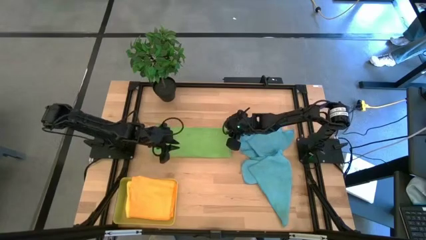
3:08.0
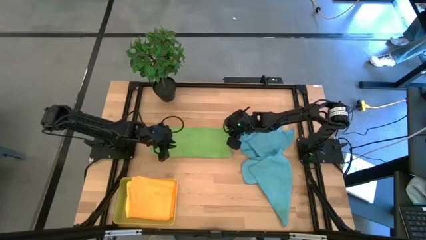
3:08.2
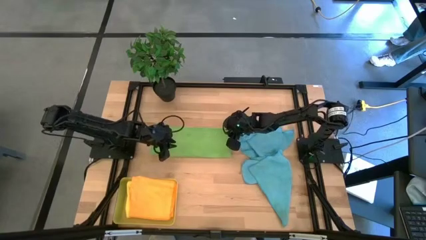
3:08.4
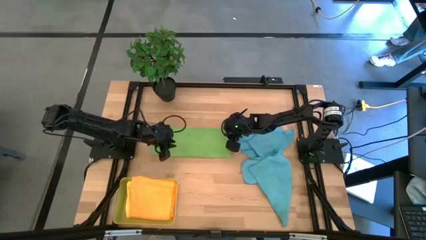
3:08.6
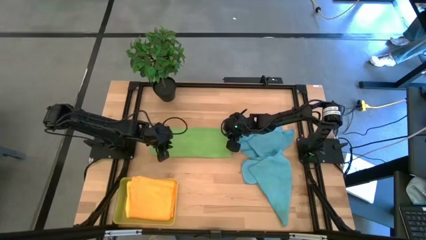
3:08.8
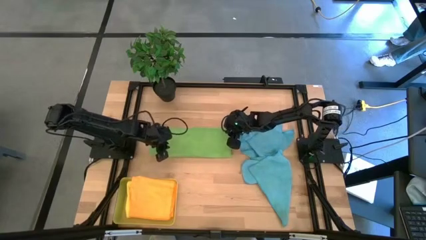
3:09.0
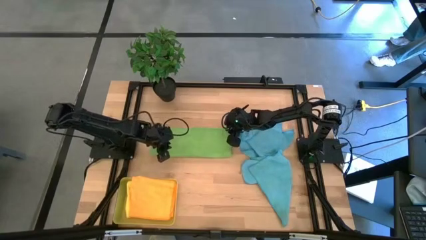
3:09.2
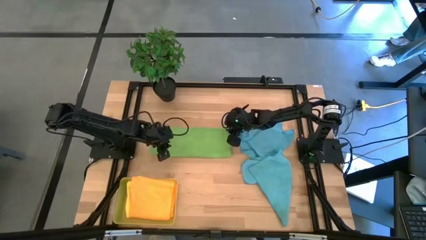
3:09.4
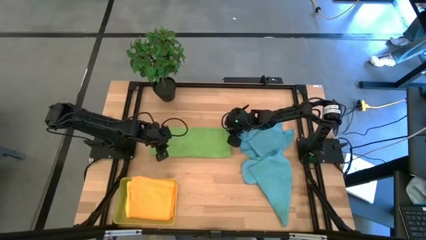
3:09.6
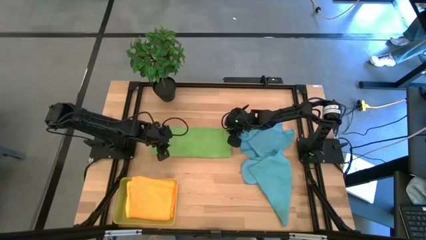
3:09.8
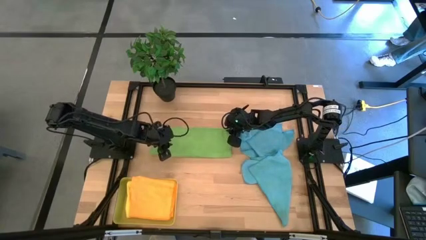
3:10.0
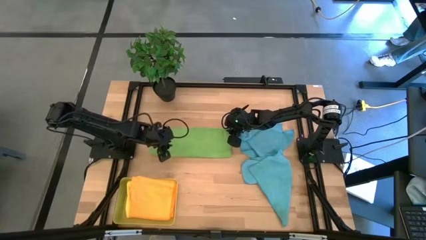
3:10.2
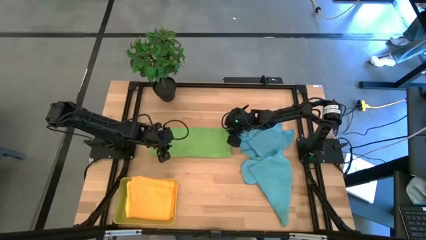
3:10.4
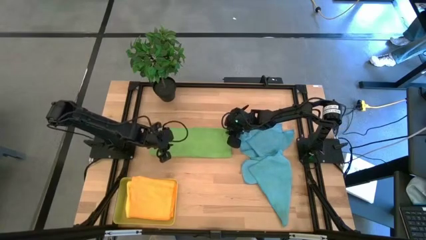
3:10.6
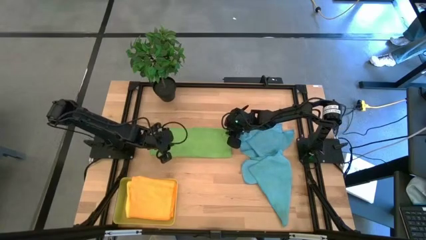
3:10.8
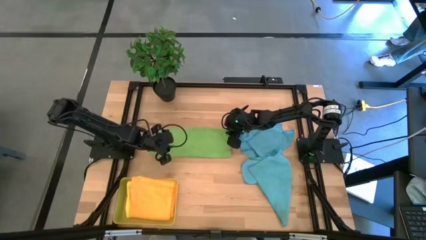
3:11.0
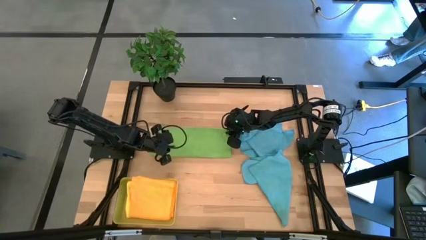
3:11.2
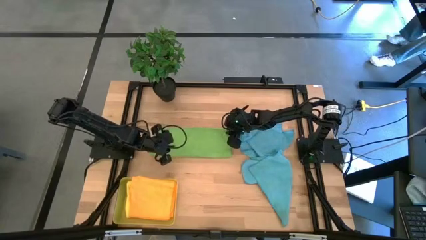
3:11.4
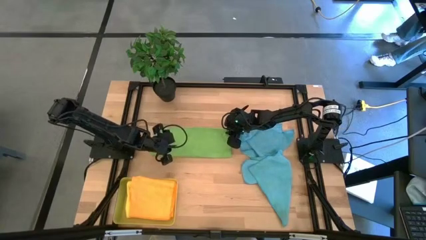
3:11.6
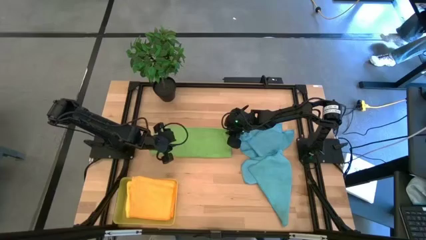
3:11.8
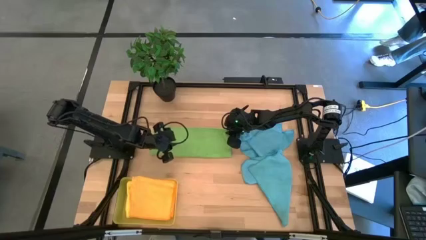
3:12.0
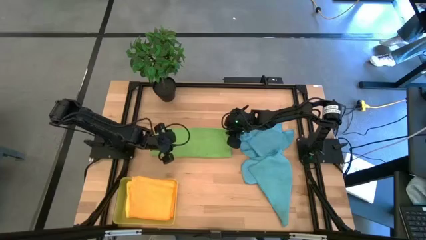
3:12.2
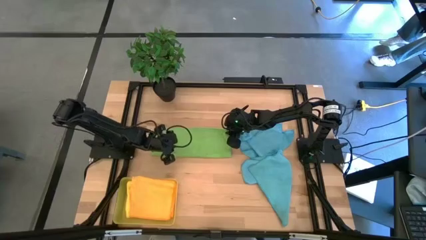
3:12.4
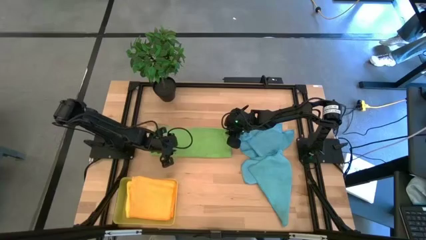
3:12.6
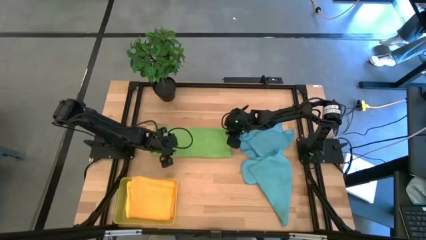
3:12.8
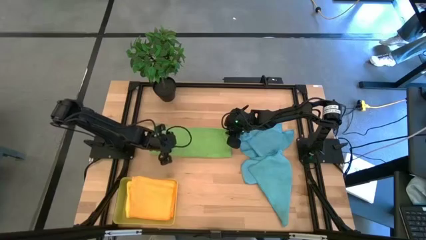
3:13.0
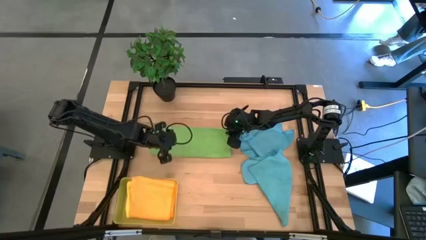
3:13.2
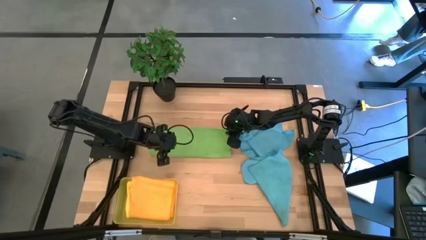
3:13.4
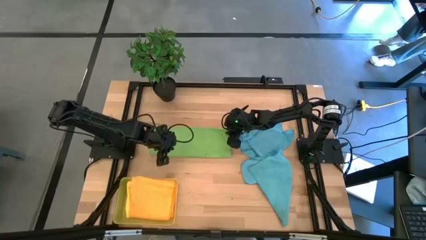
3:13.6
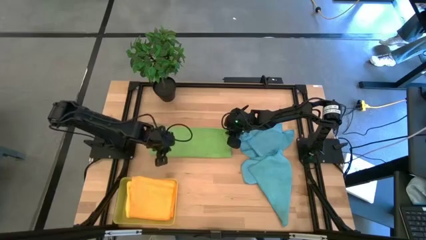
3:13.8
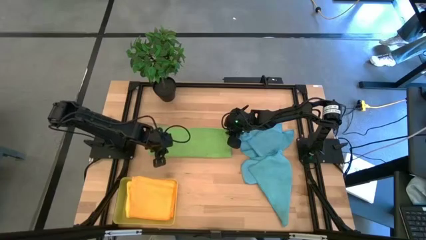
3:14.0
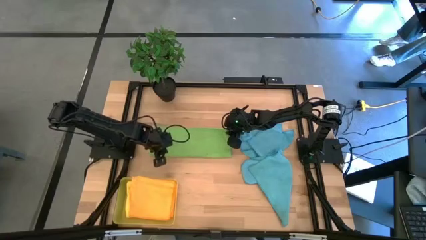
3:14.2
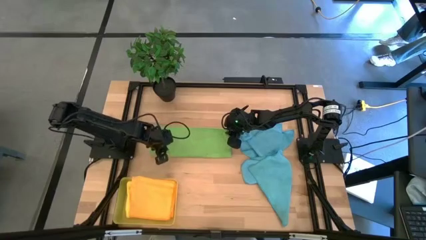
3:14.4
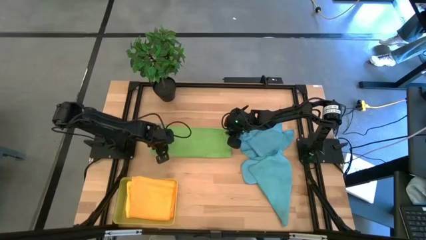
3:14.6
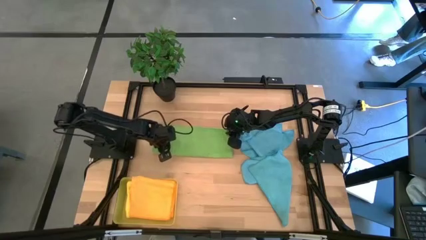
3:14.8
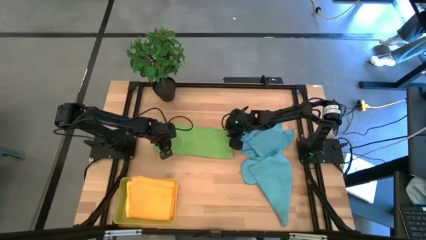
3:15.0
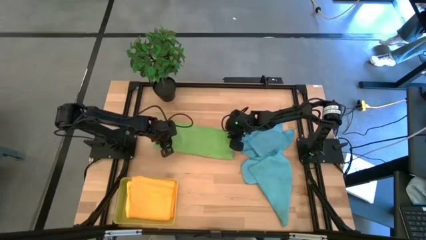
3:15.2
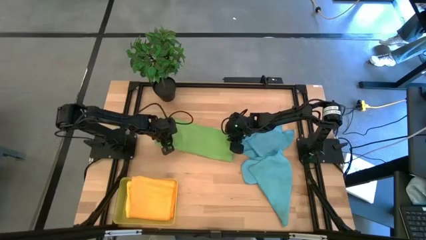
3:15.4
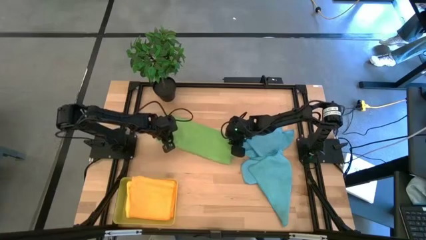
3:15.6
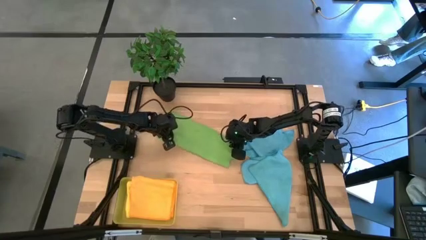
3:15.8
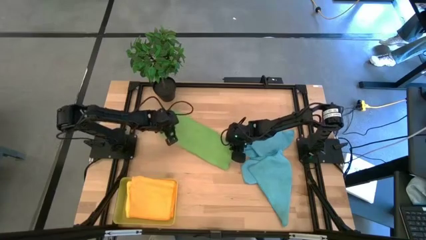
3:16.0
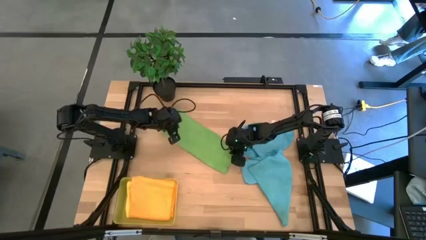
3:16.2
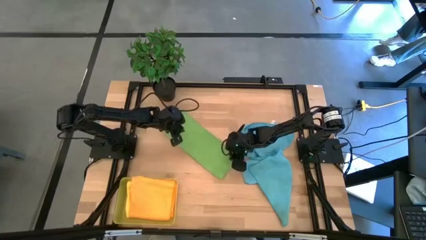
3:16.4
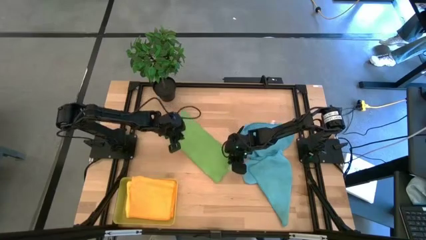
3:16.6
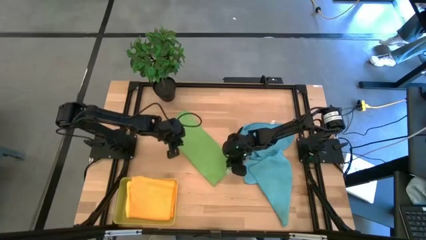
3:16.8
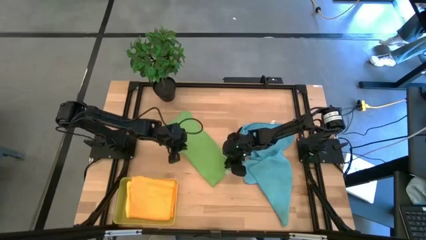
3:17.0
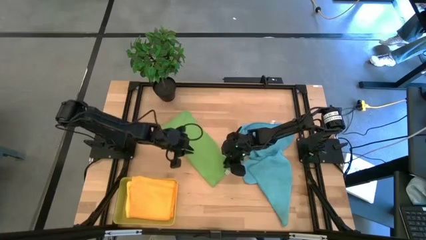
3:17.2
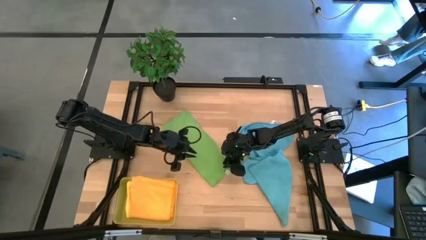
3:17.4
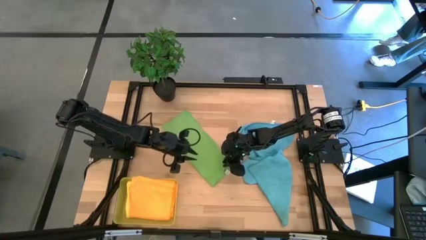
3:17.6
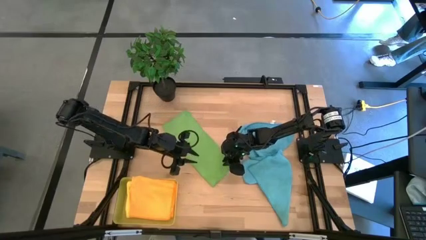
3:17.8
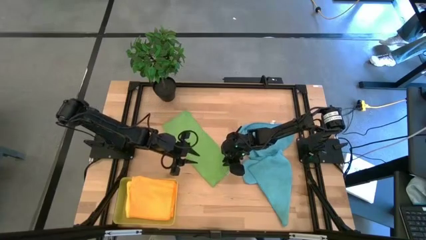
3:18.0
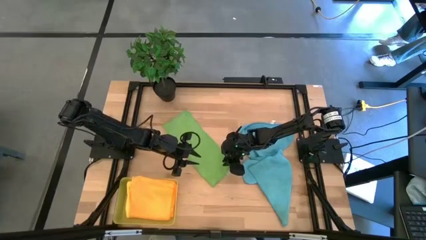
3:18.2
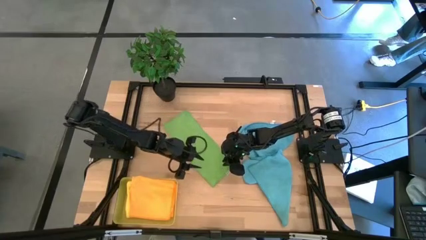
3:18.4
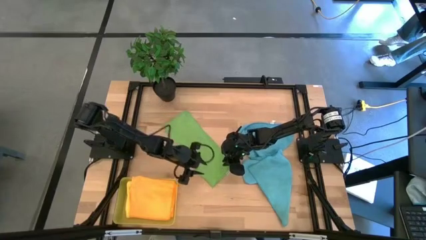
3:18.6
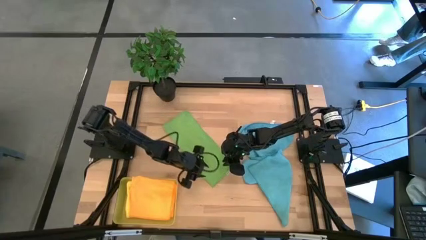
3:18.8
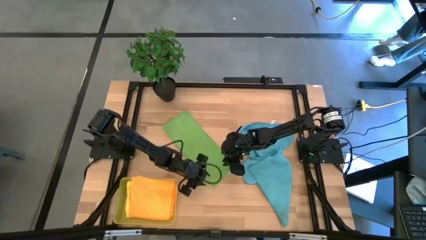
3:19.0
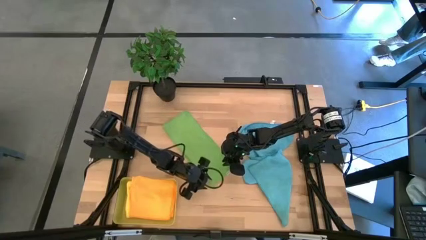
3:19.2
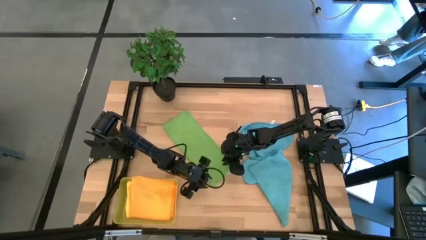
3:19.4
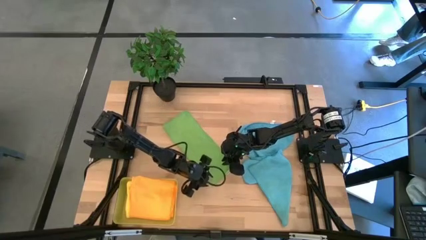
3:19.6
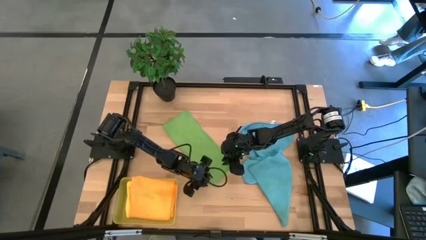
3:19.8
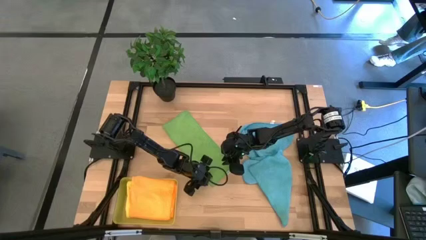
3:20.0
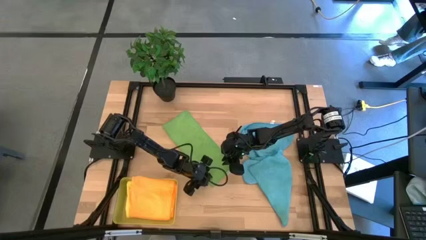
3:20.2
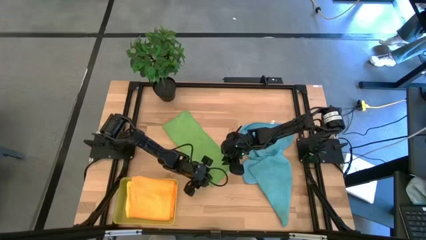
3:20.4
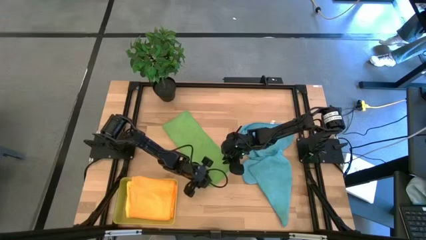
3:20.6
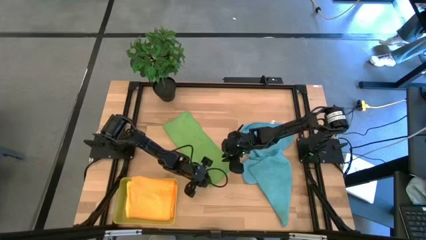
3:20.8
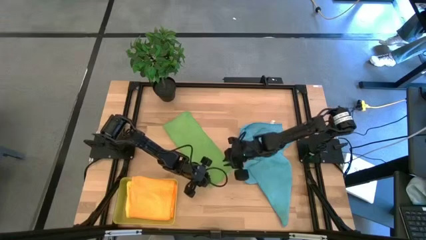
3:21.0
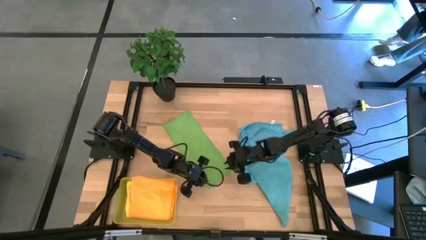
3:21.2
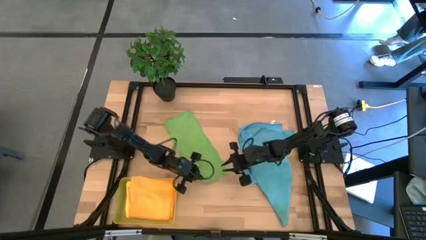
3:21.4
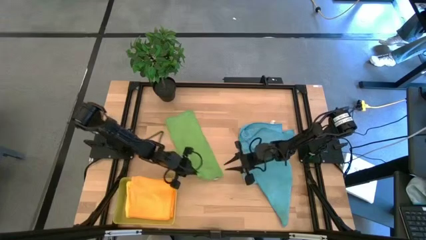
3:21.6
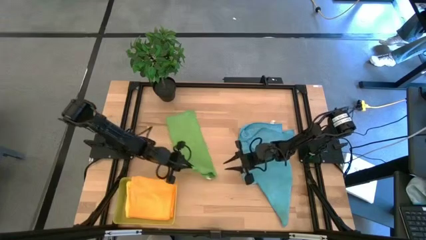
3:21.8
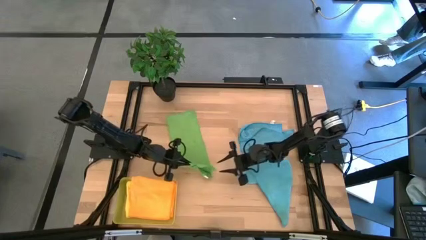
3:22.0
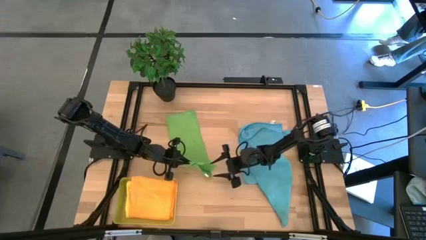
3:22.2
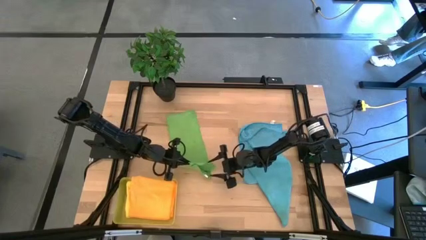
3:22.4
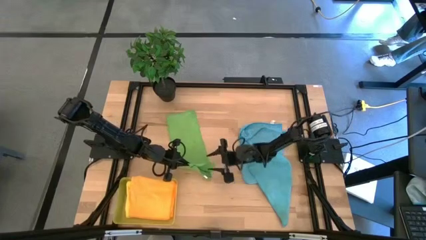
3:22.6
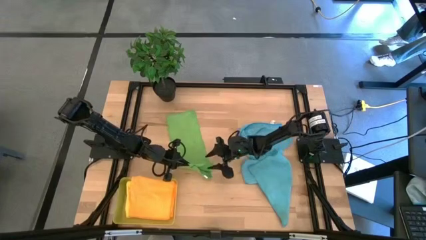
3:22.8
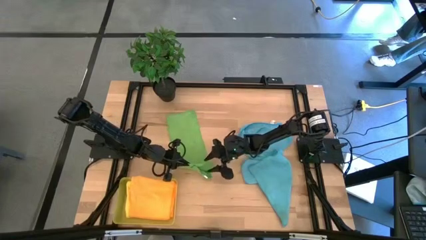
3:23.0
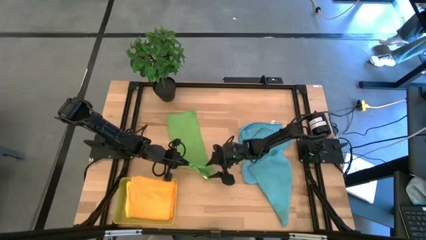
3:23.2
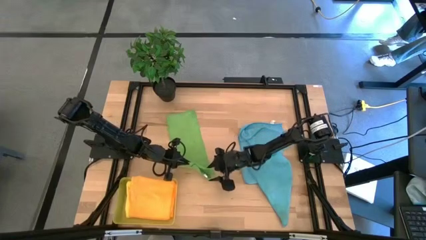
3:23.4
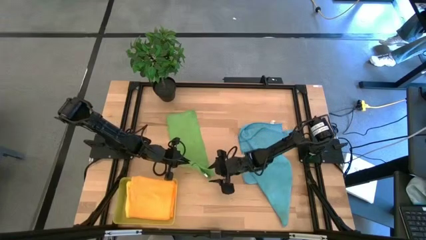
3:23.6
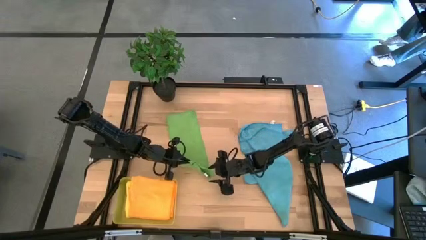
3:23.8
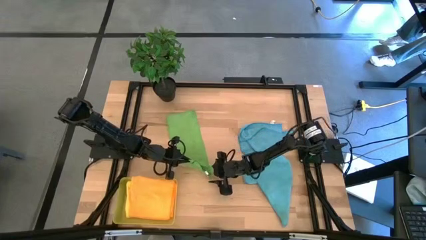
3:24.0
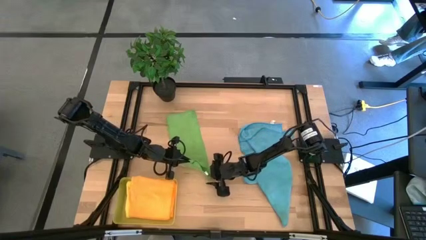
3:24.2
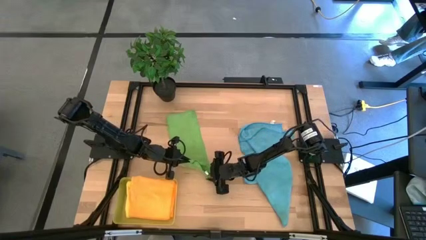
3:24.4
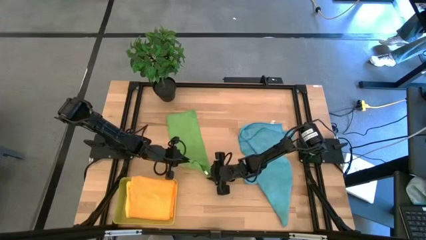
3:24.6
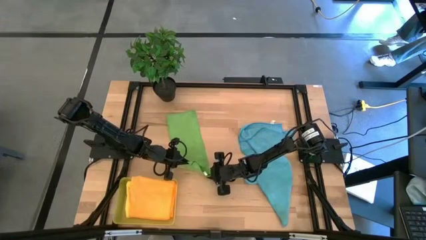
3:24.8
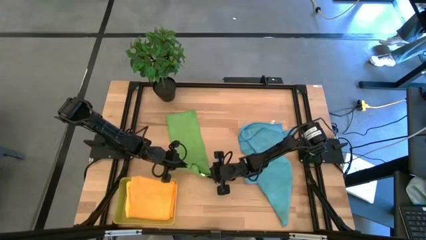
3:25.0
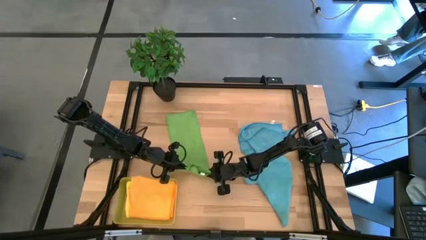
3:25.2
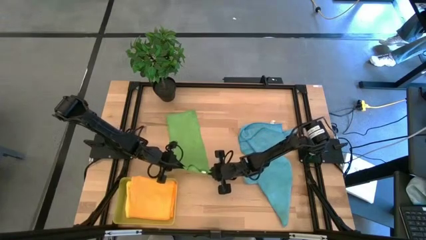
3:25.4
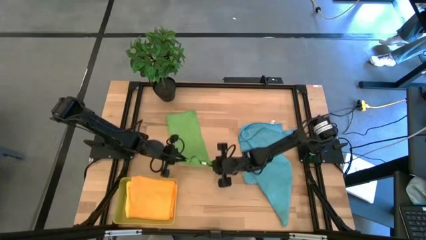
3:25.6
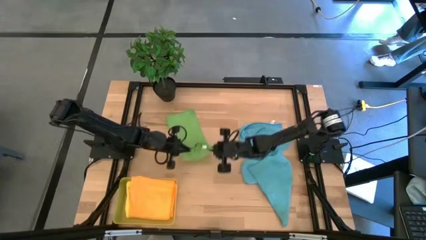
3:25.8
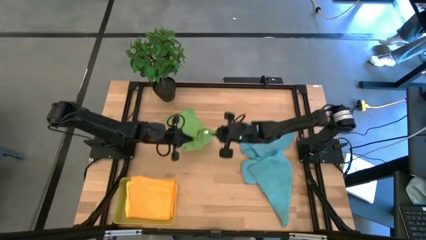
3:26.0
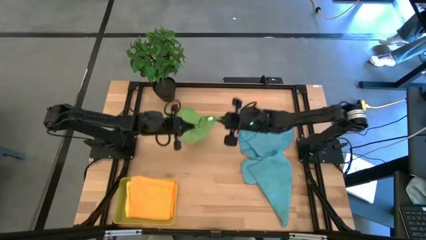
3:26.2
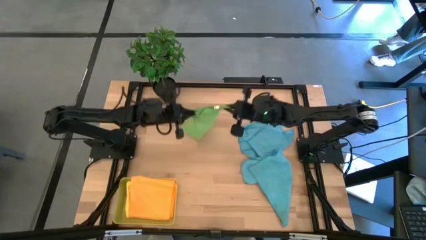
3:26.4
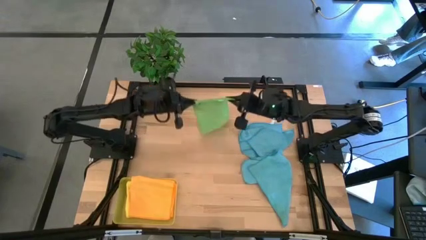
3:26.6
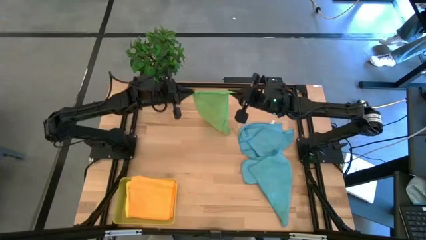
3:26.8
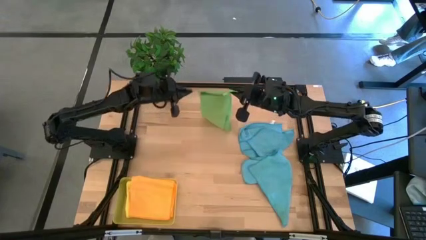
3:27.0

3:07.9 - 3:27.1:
Task: Fold microfiber towels
Fold the green microfiber cloth
